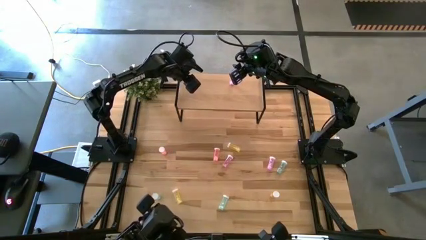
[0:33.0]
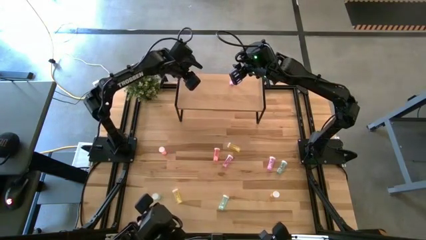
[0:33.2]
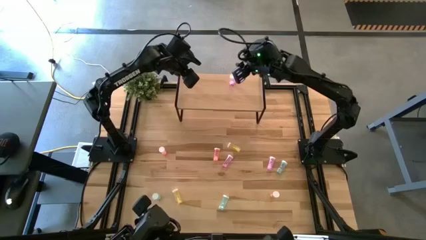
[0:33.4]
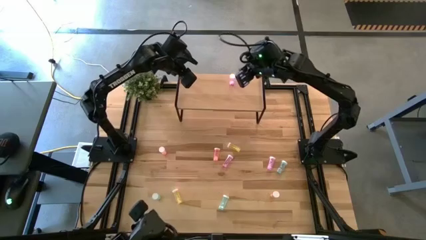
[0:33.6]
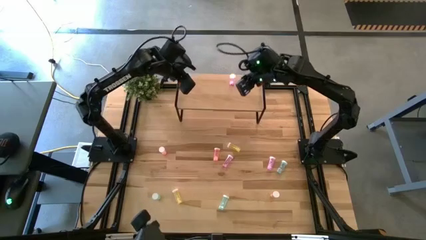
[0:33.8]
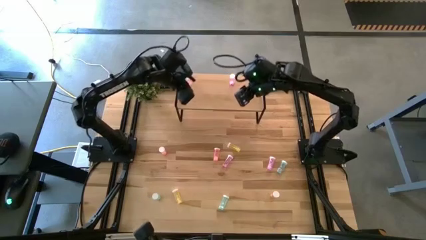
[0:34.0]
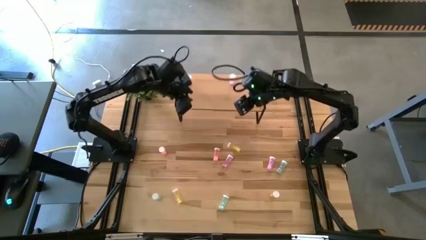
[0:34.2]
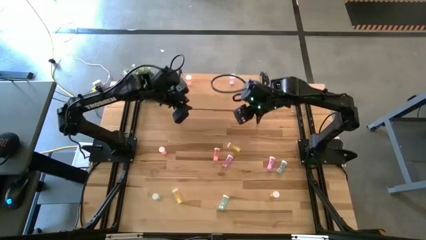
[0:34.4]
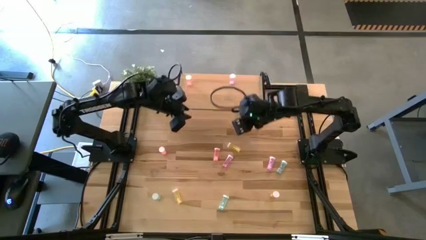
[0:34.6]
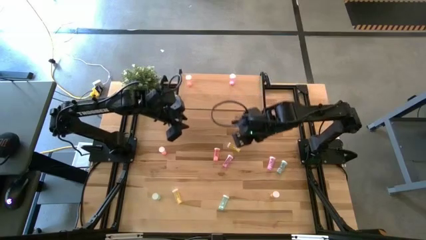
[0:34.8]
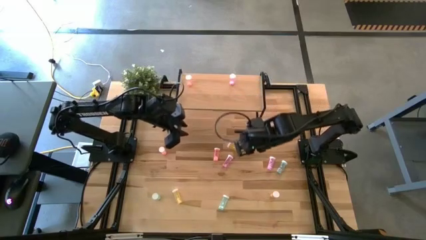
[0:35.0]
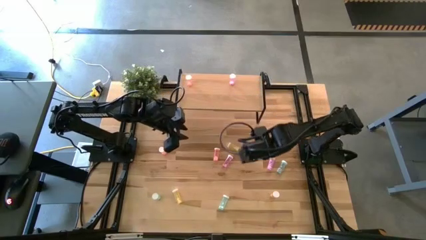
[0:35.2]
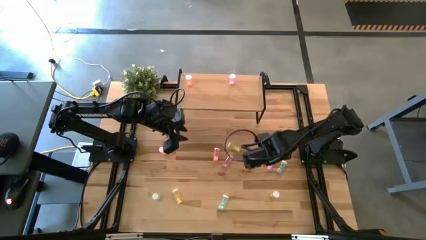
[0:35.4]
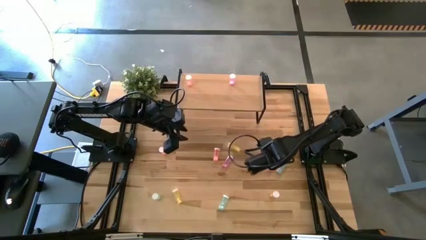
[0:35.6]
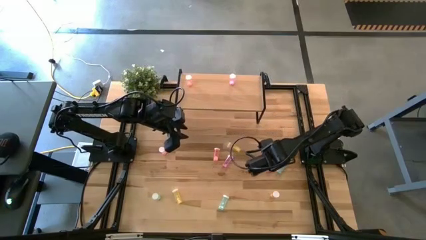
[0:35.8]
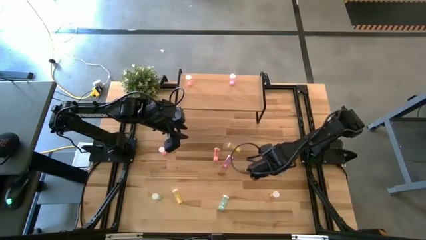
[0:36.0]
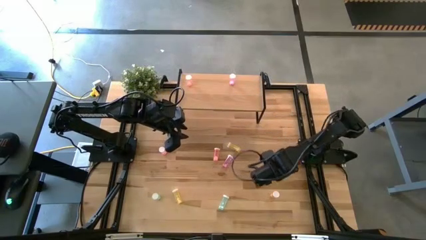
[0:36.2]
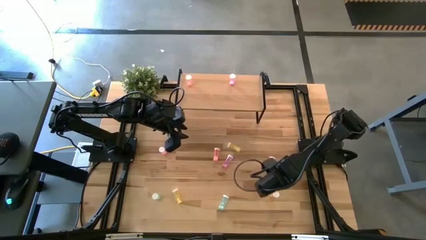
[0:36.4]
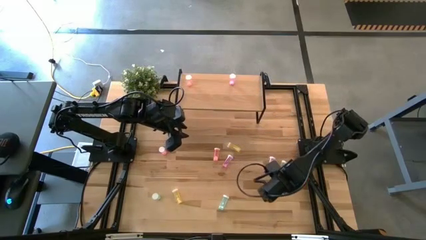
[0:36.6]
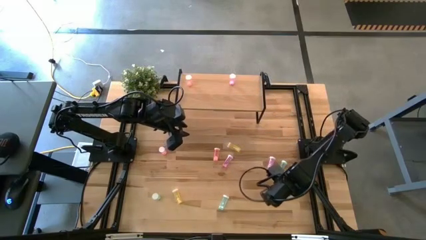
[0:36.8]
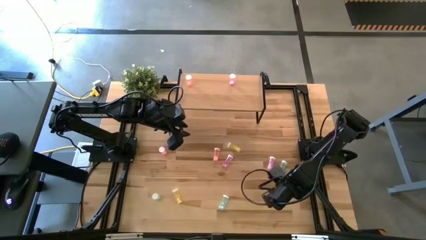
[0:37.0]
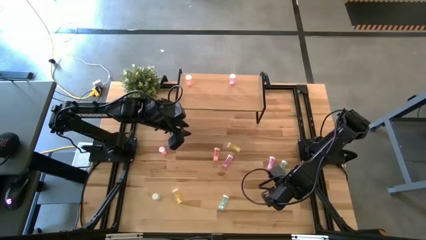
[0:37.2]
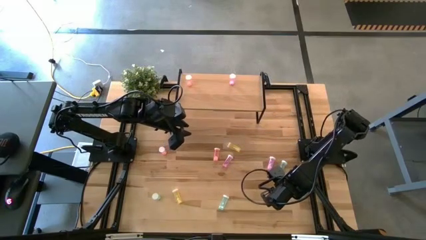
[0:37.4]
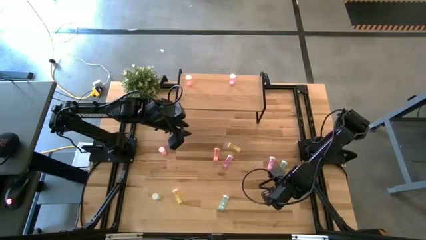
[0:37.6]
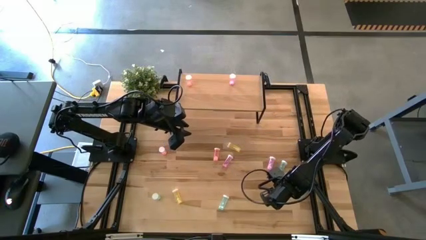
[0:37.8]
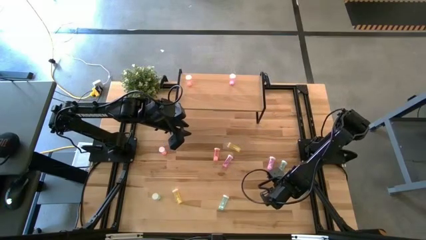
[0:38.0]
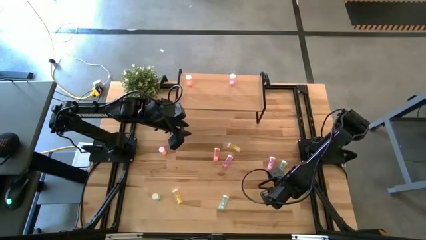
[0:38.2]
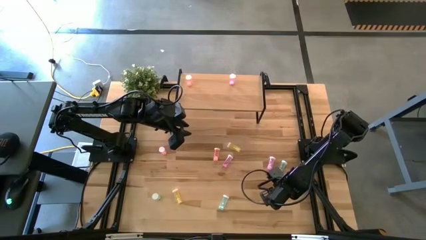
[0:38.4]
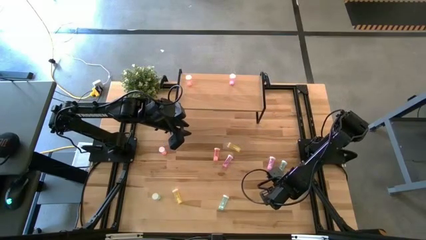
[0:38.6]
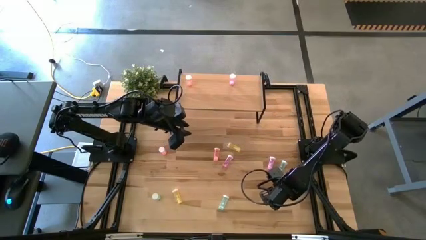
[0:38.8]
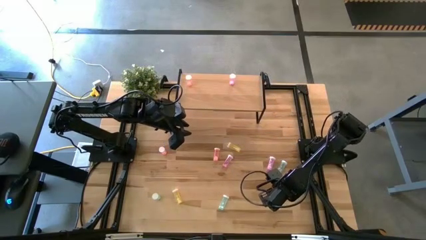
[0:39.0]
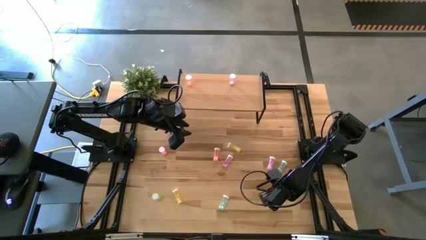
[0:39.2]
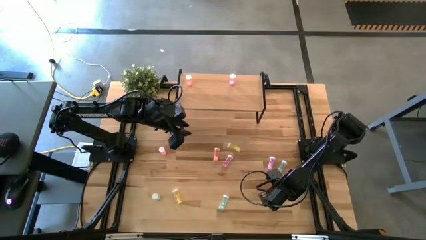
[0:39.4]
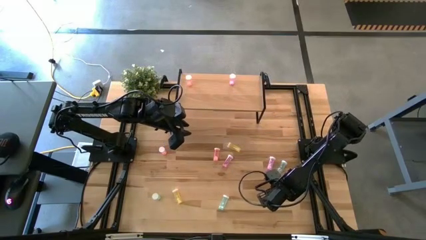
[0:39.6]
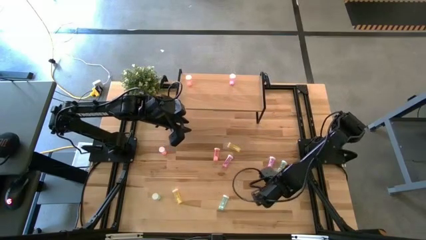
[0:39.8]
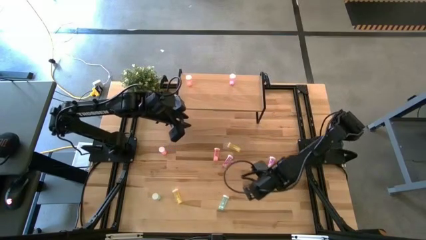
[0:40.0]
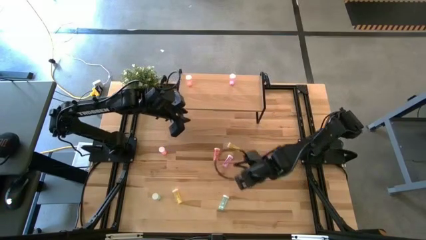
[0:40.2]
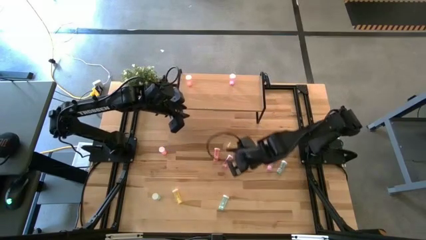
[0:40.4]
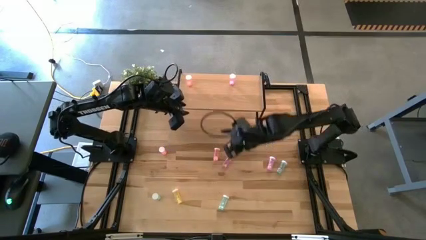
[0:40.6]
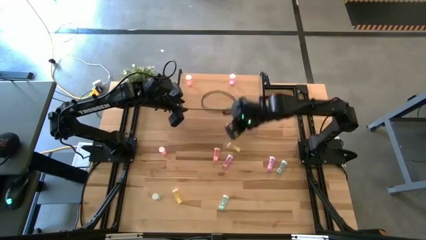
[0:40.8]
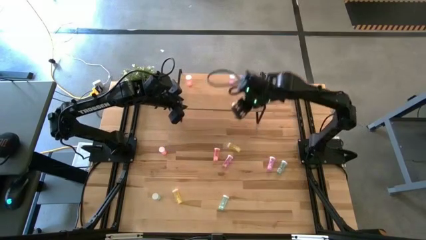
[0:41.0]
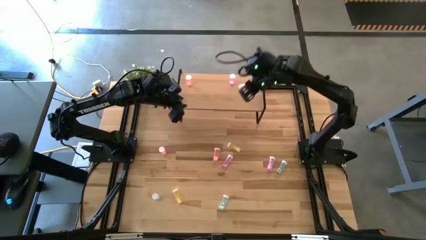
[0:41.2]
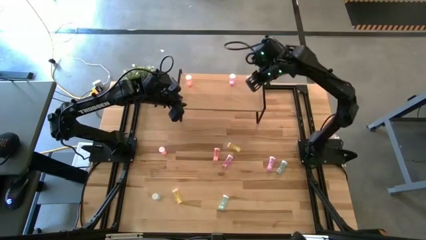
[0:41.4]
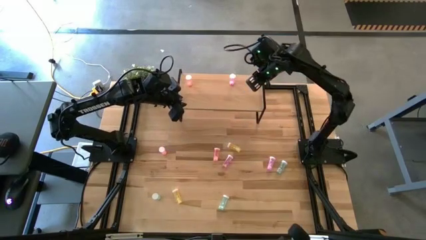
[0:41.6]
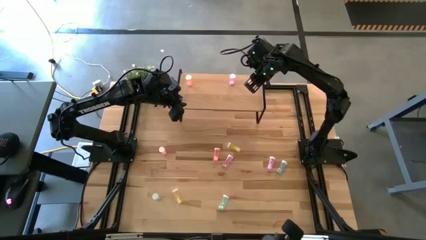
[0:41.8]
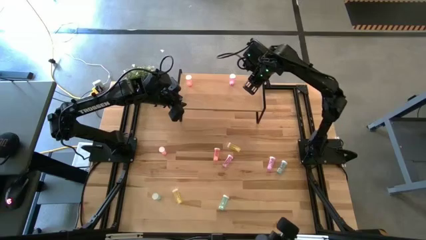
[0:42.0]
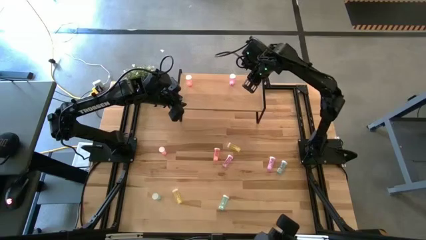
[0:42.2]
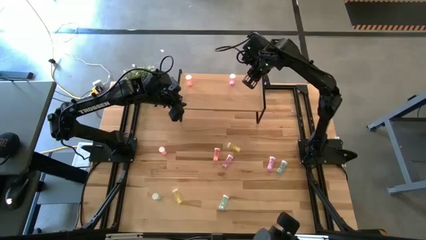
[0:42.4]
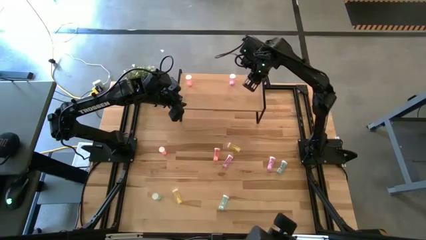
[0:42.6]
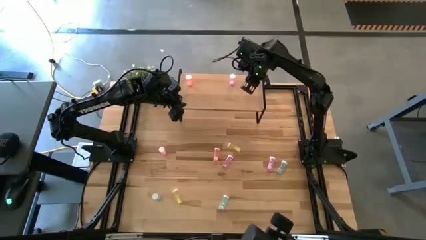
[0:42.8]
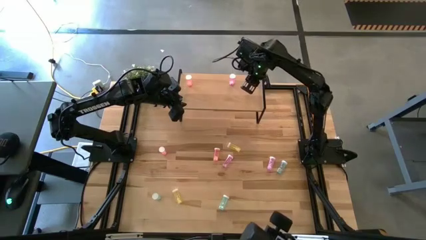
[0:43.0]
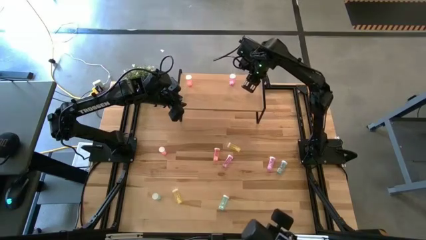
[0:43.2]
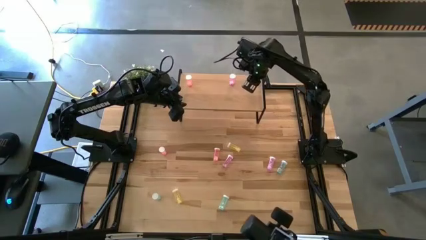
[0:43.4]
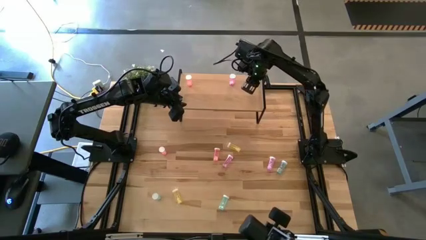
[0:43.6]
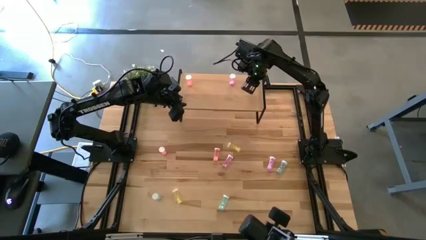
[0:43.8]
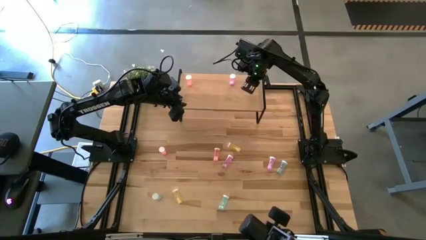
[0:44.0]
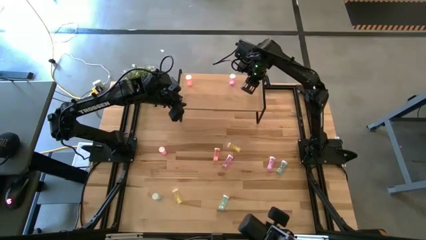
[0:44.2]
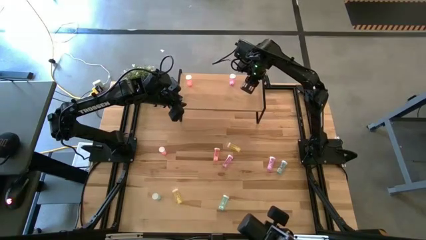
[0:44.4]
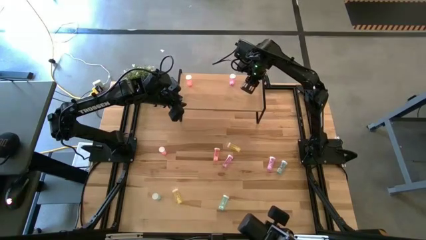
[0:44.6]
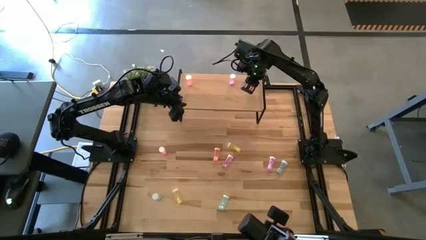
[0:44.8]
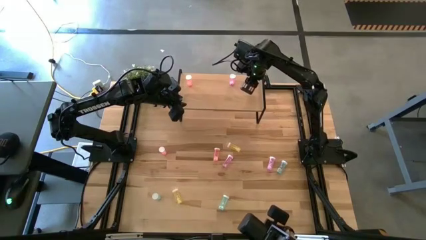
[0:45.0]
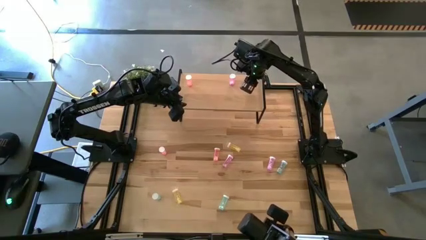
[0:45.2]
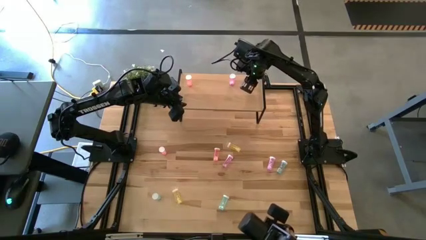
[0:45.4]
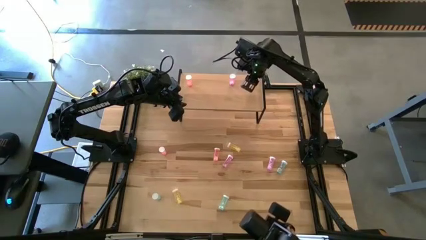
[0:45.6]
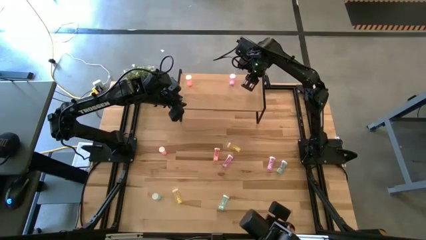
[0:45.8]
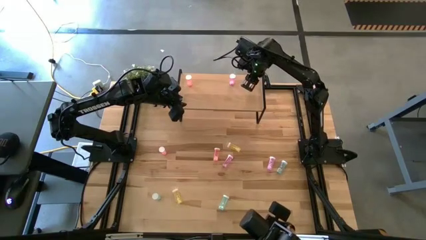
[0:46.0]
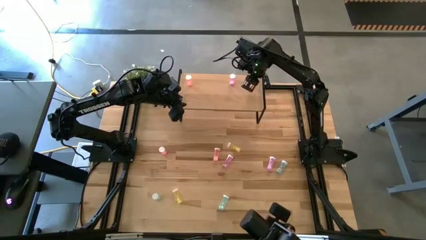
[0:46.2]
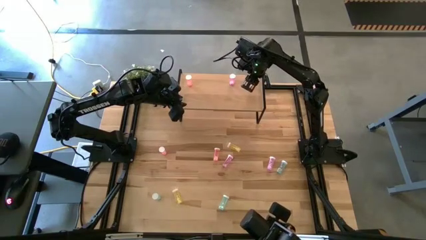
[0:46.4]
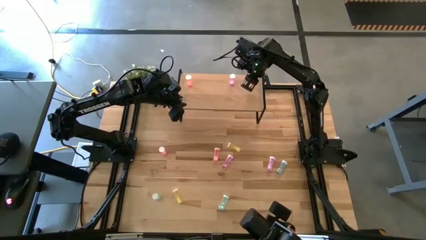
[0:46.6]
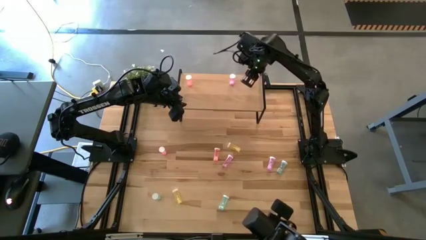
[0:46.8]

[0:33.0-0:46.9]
Task: Pick and place medicine bottles onto shelf by color
Put the bottom right yellow pill bottle on the shelf

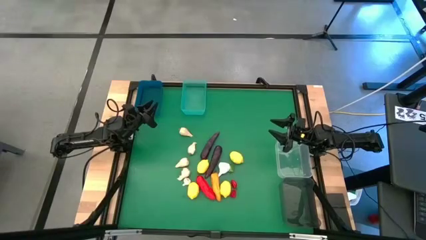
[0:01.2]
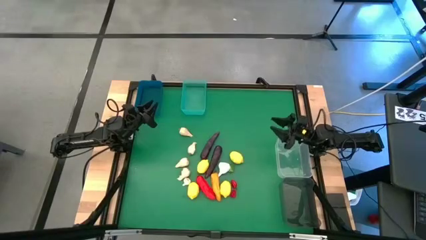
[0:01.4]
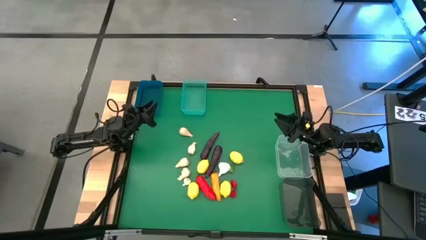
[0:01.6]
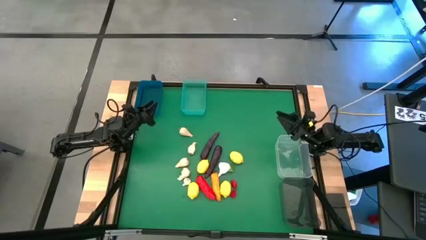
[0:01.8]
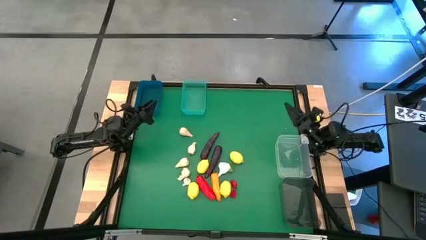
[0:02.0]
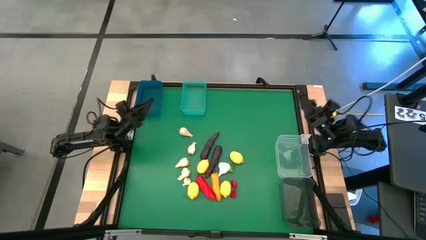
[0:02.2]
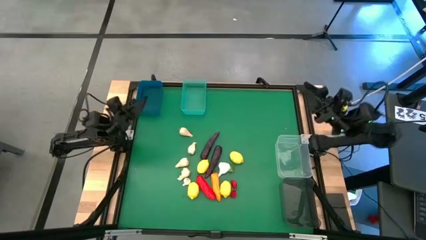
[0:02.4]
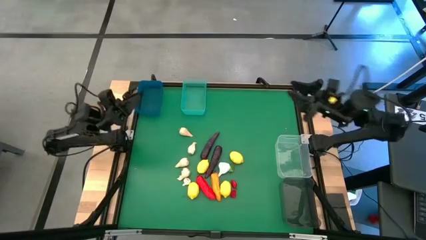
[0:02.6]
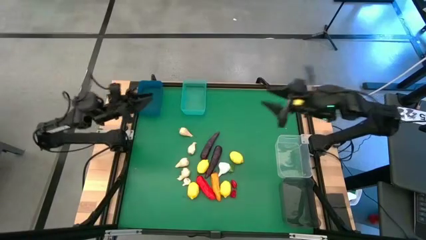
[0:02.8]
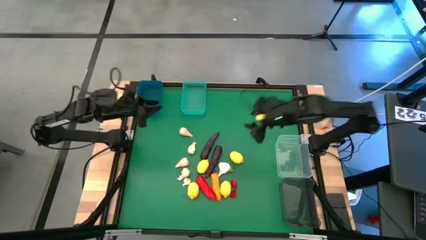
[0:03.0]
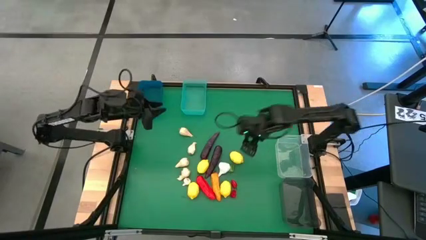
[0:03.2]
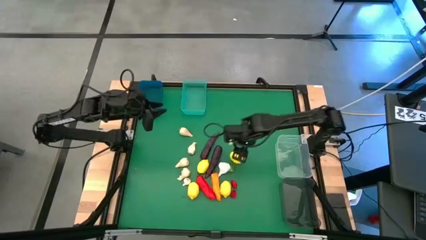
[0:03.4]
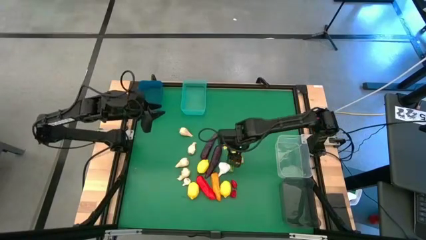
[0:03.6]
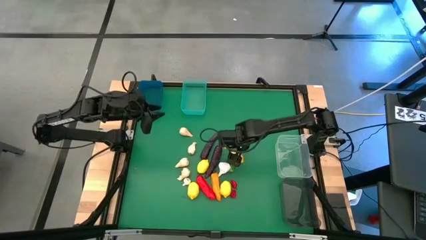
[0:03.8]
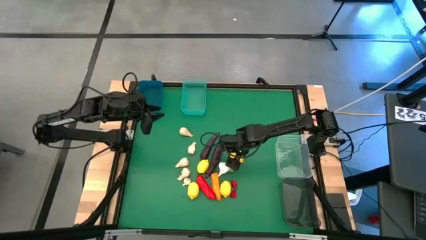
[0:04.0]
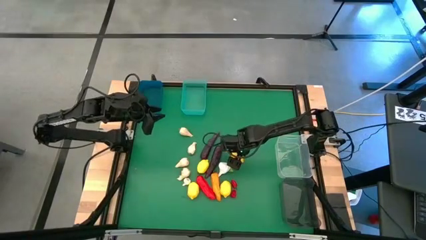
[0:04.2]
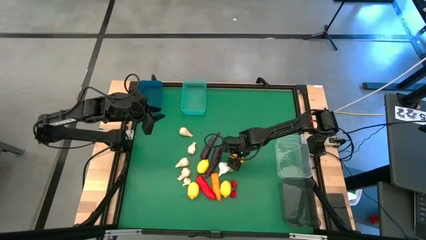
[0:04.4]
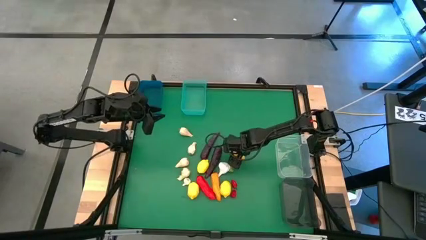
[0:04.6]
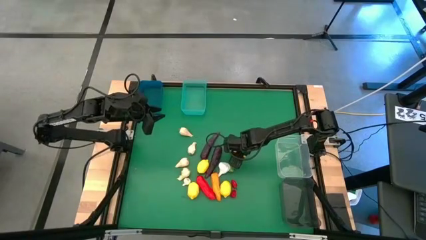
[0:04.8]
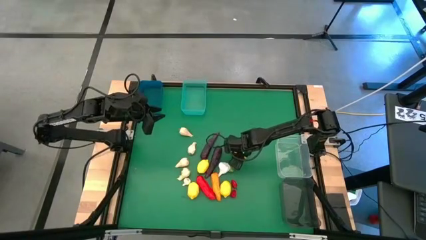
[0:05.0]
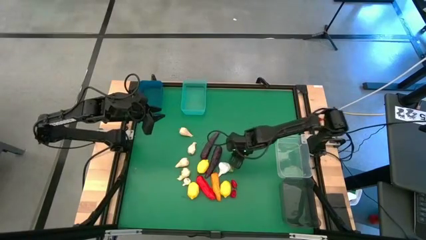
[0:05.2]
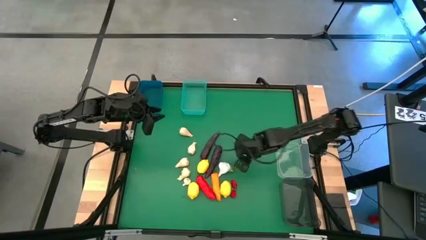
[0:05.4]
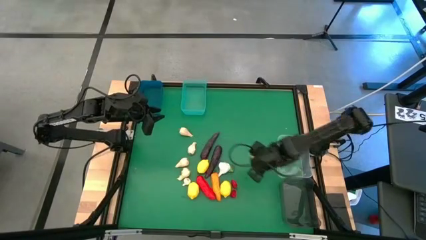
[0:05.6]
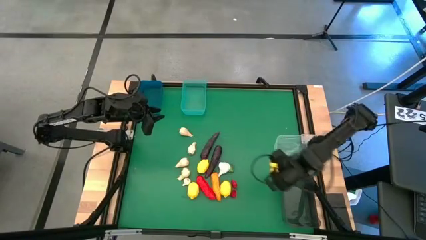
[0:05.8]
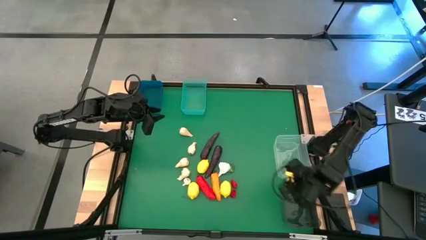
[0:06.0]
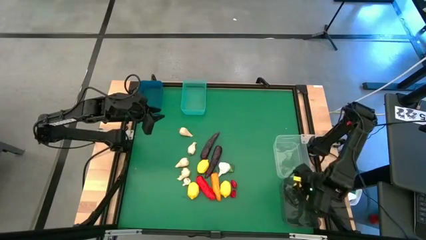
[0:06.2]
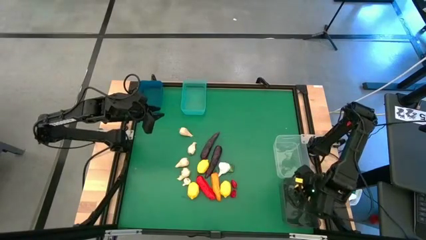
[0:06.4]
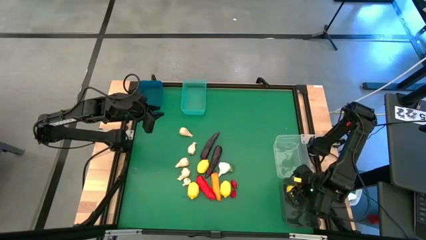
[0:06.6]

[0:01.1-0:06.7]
Task: Sort produce into baskets
Put the yellow lemon into the black bin
